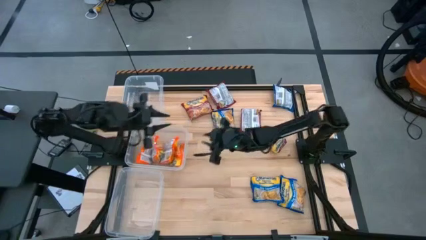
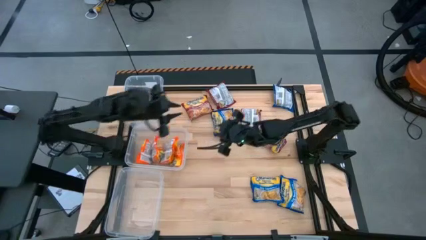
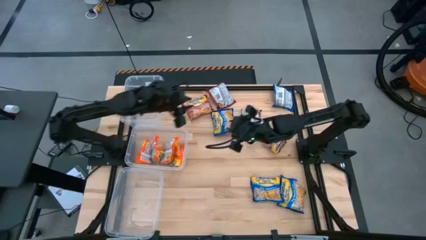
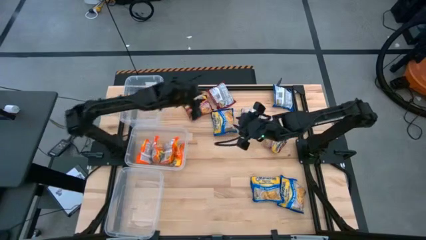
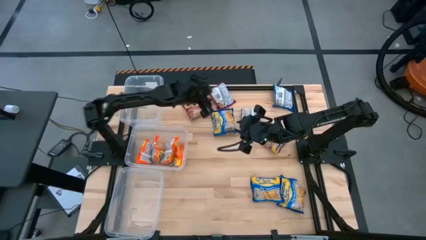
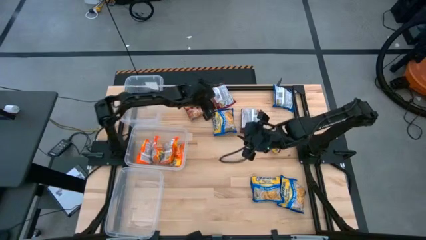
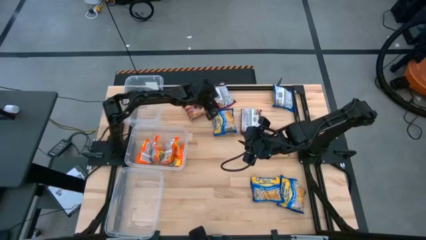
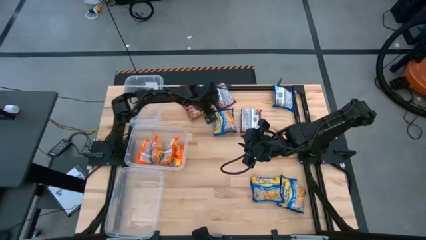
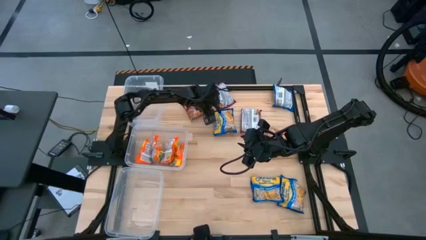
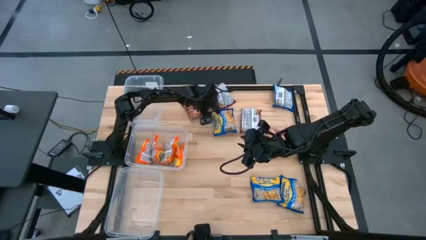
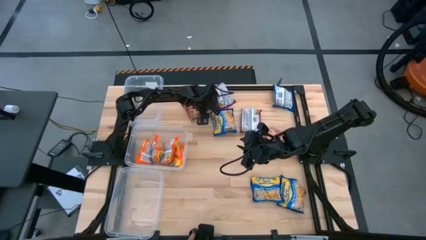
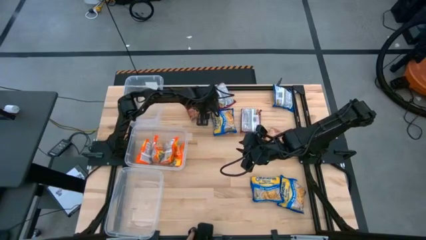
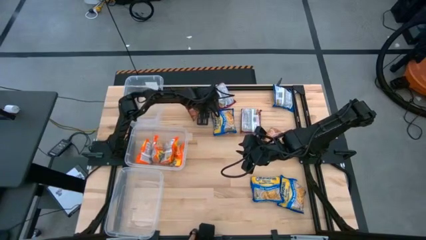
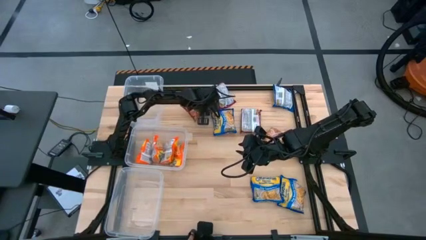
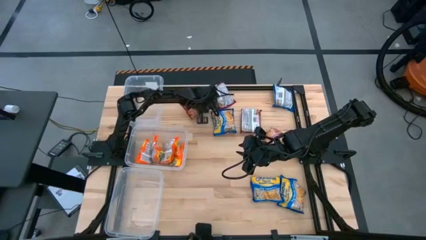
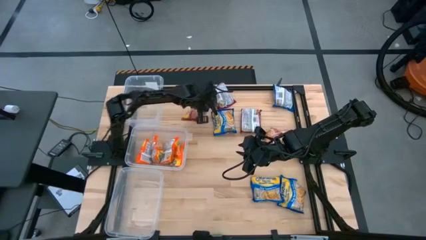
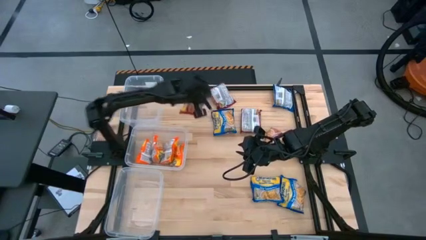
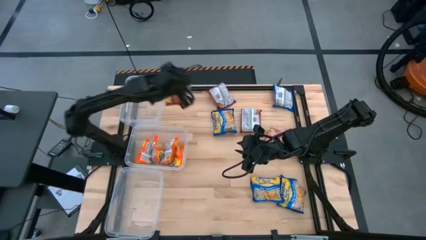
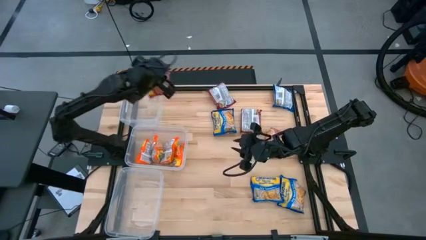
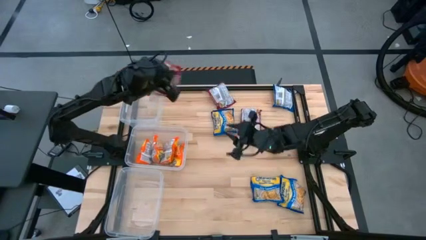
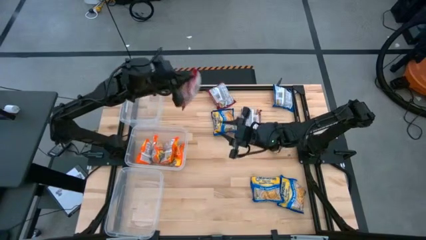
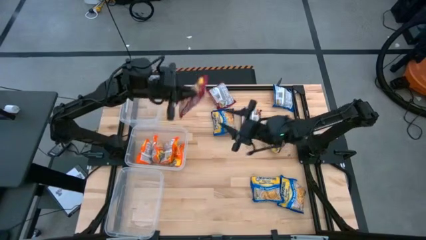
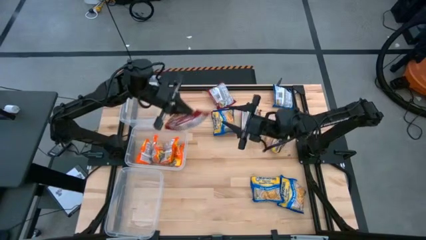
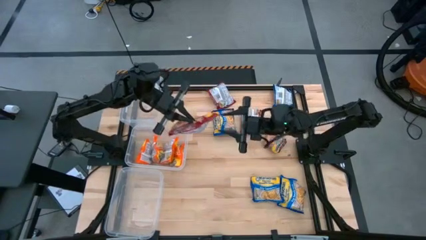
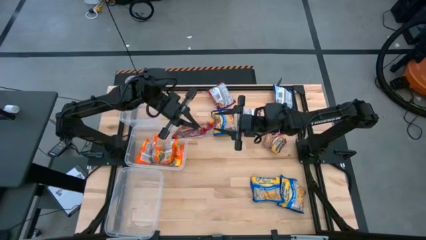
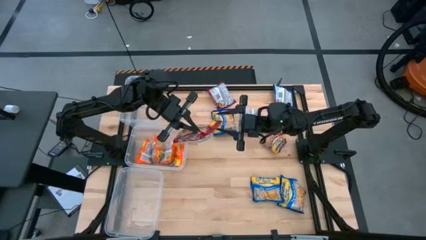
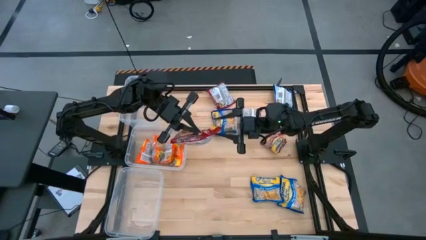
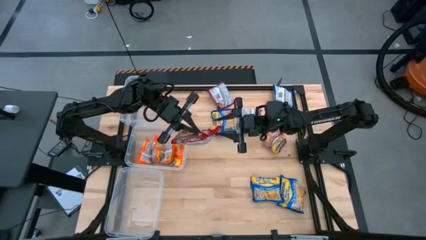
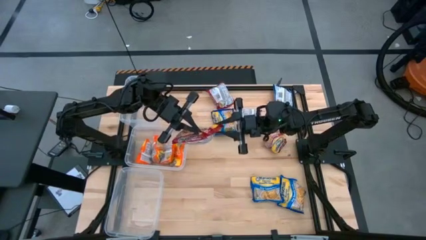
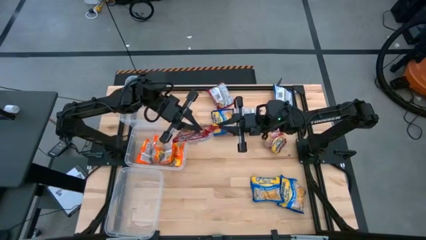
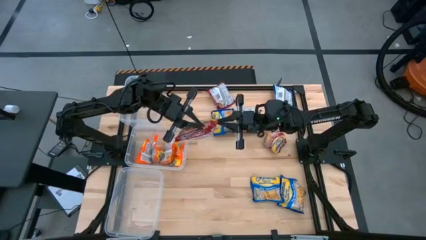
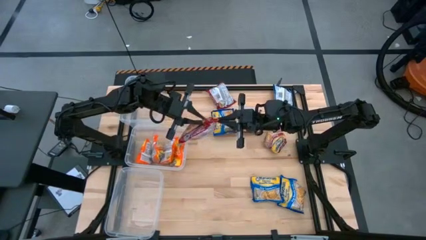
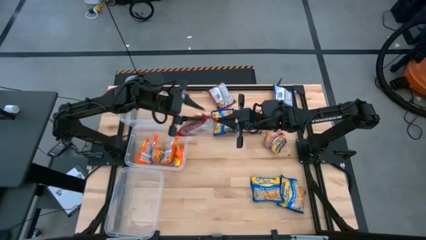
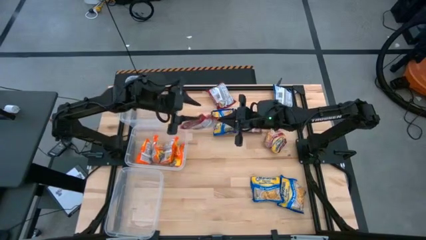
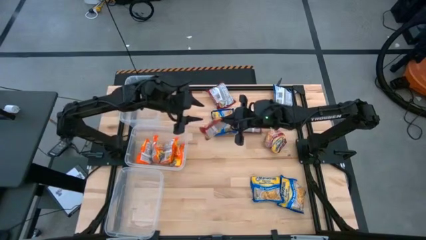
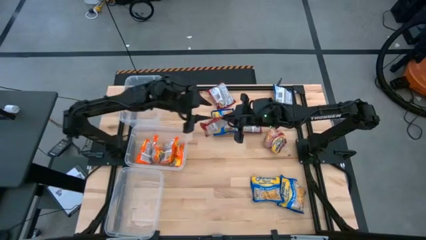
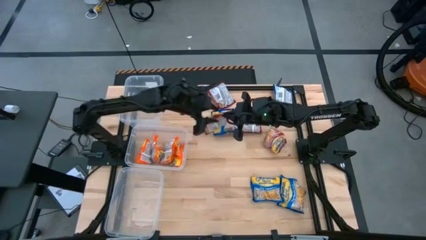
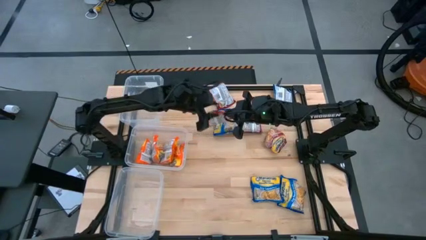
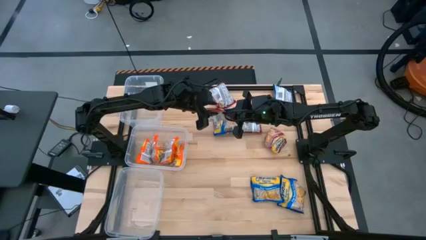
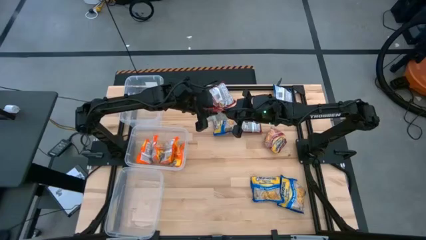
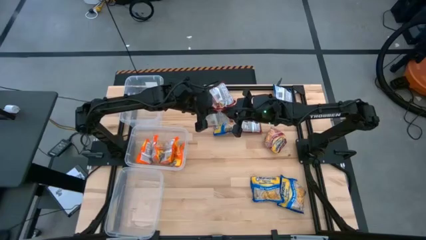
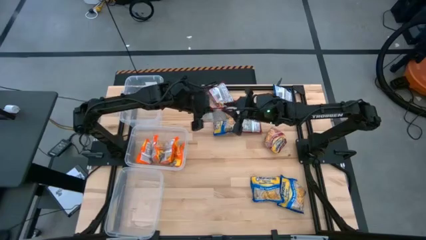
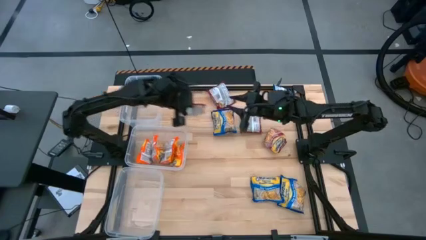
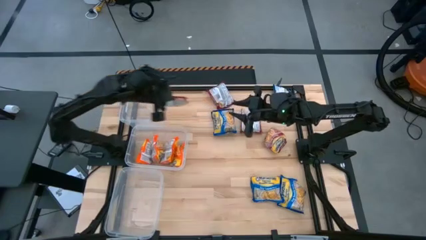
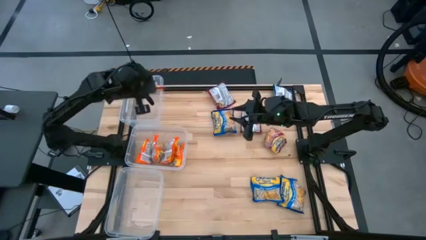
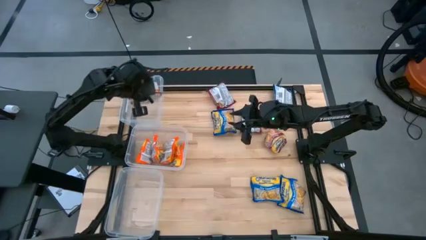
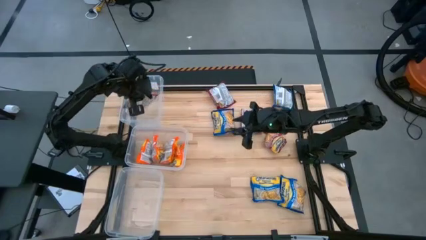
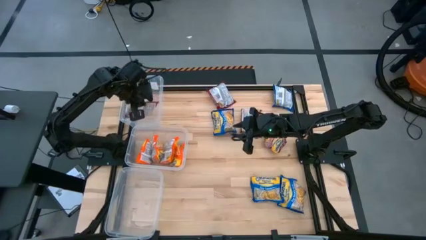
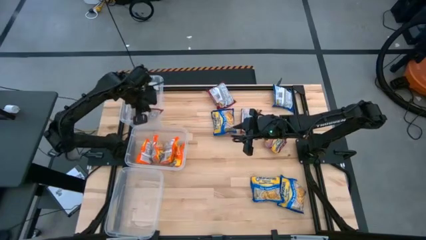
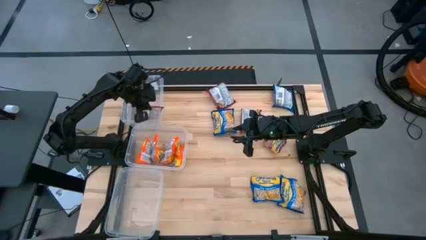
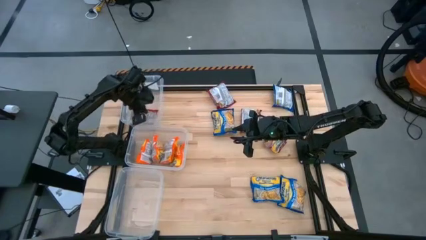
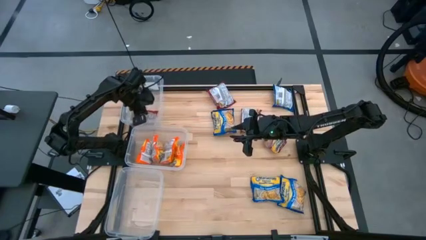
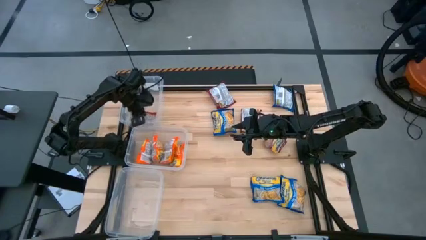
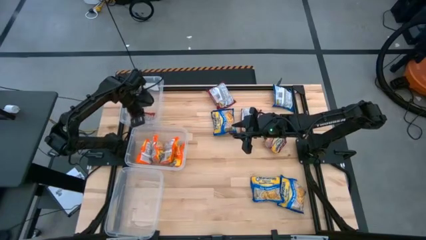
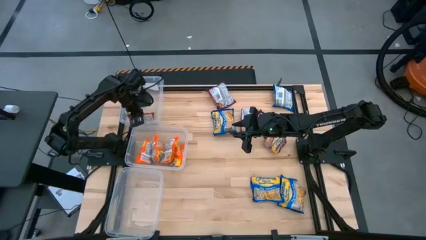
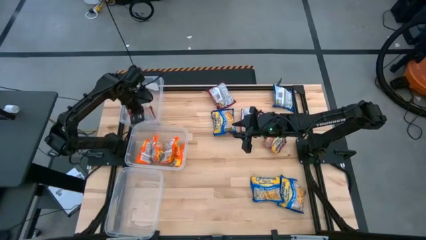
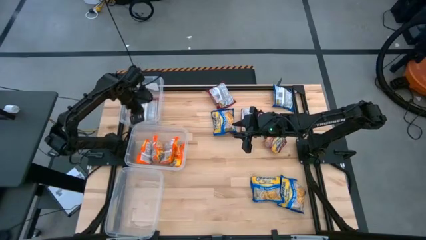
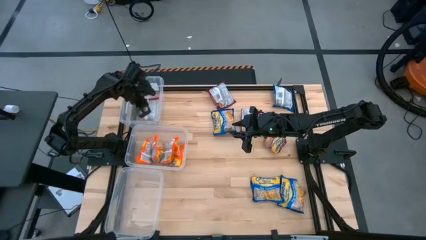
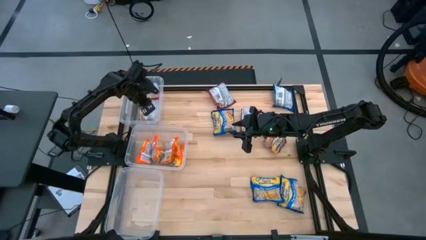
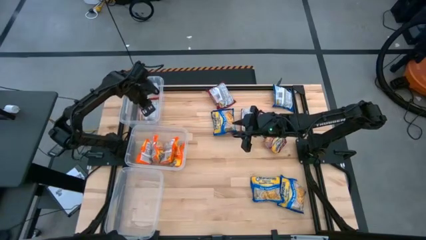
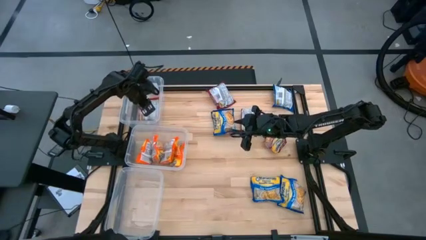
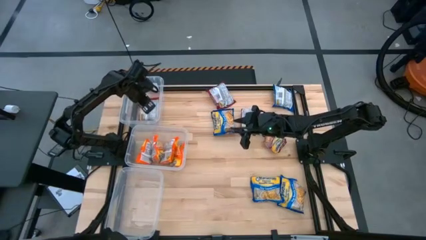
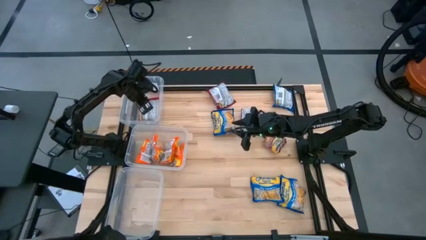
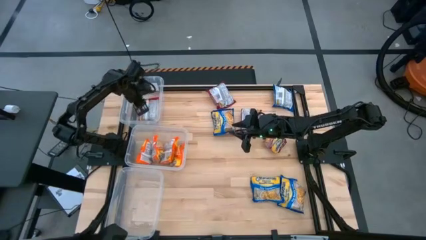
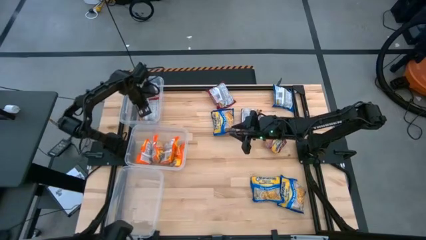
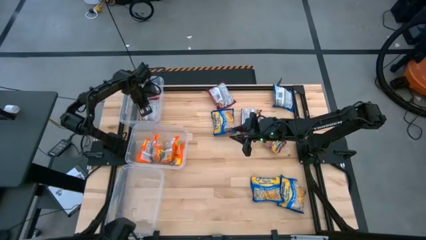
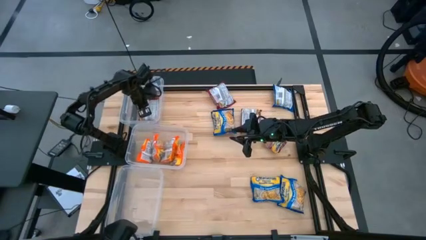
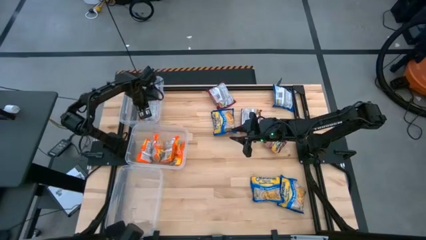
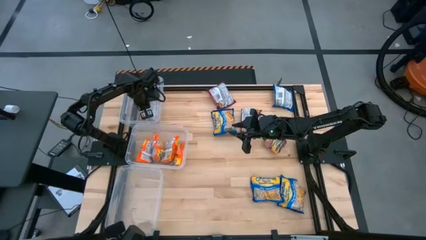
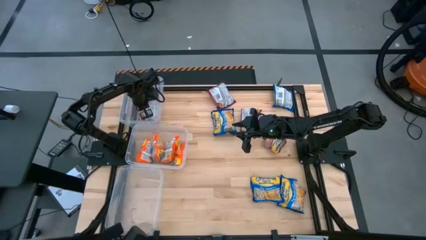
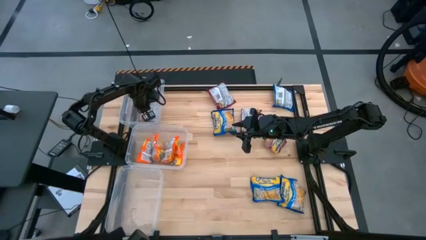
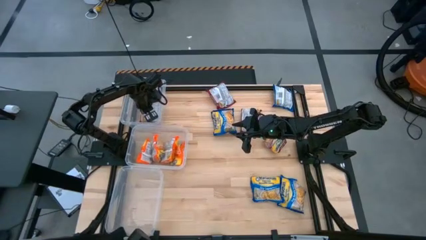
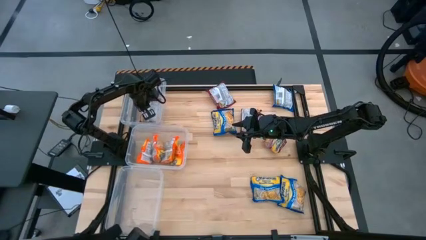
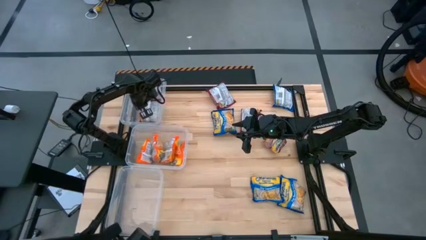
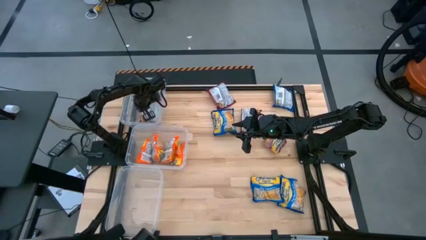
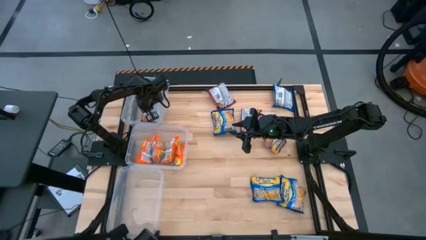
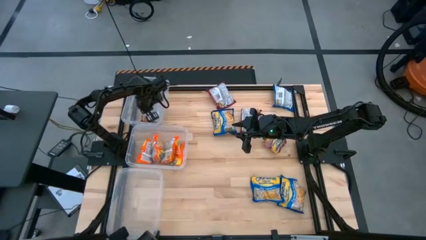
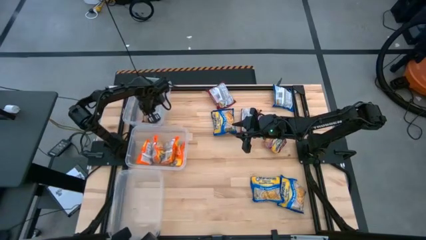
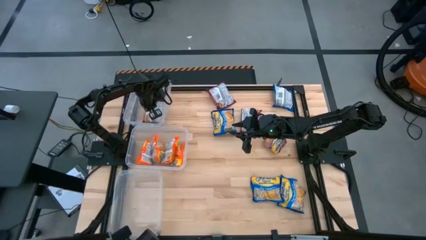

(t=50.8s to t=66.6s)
Task: Sort Maruchan noodles
Put the red noodle pack into the top transparent bin

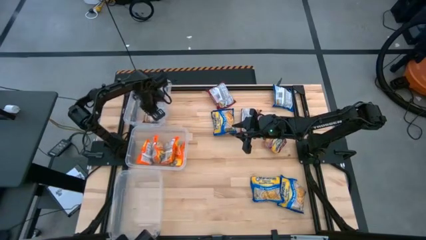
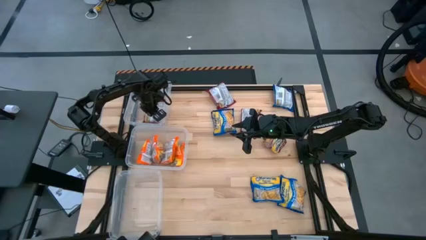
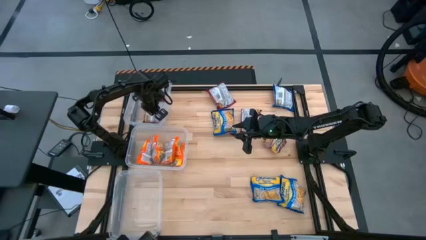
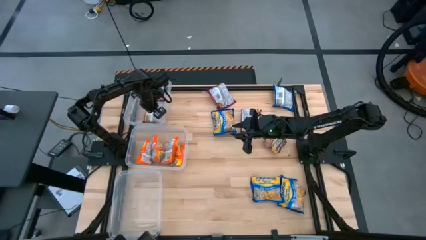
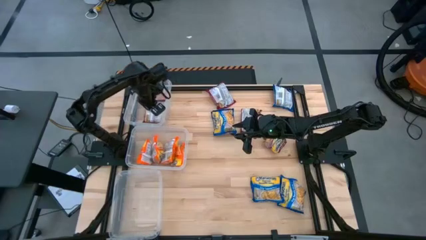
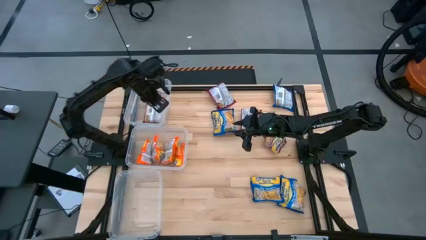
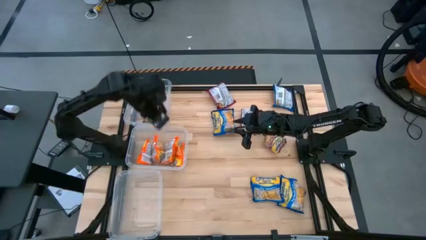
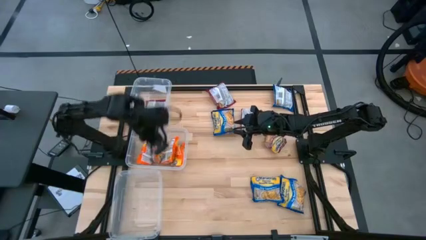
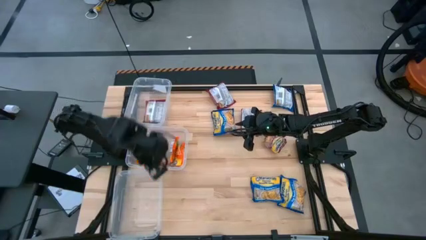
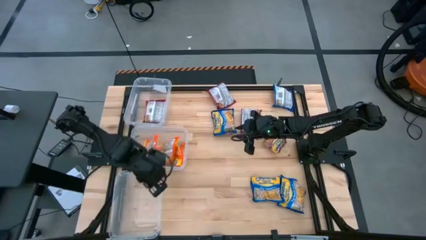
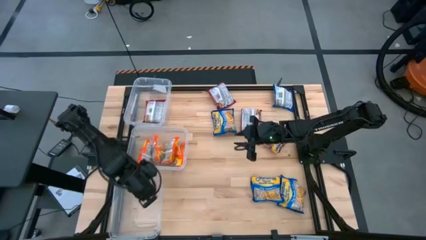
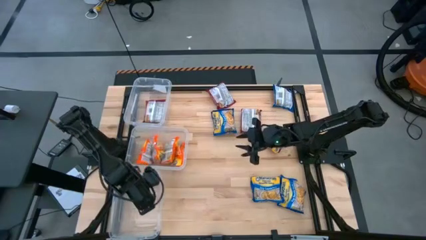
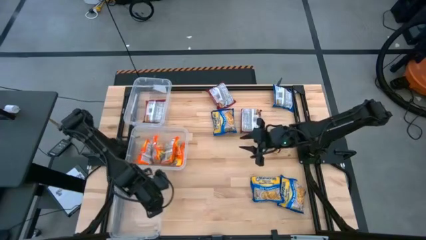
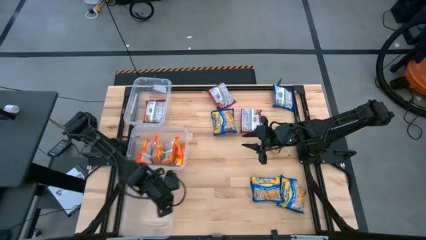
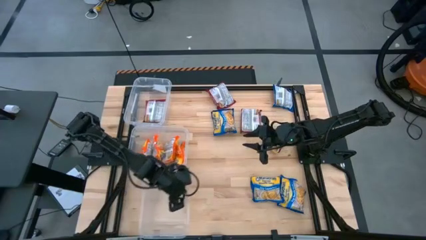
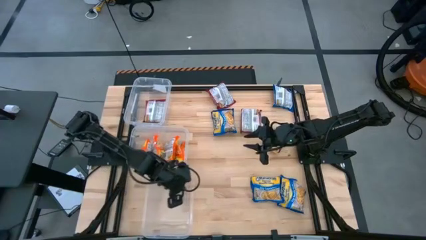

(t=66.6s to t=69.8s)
Adjust the bottom transparent bin
